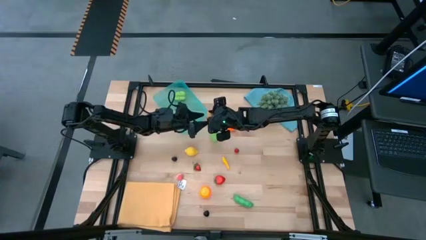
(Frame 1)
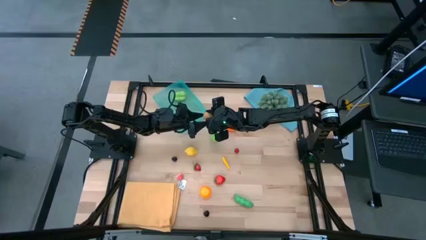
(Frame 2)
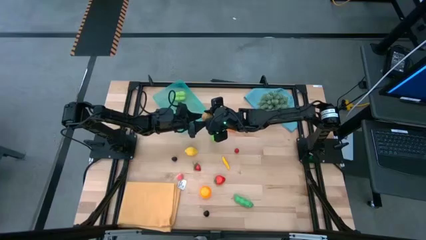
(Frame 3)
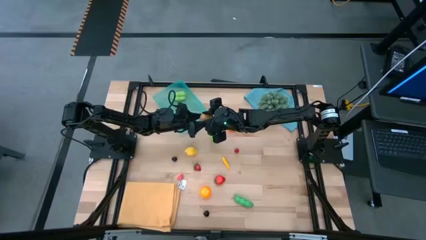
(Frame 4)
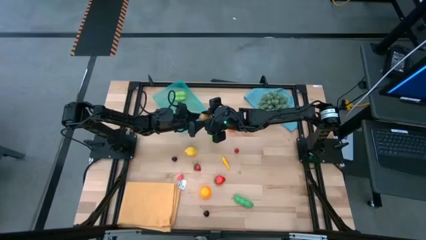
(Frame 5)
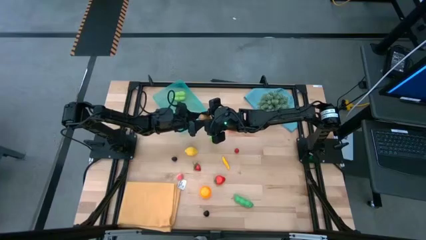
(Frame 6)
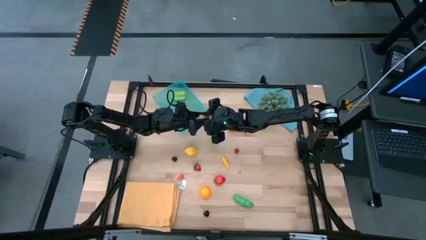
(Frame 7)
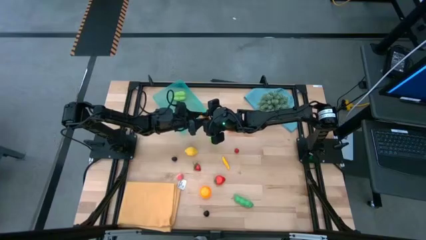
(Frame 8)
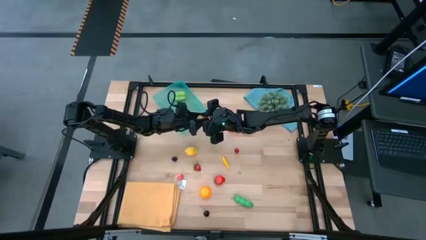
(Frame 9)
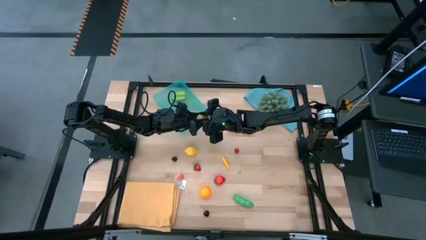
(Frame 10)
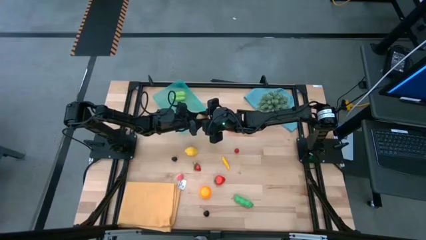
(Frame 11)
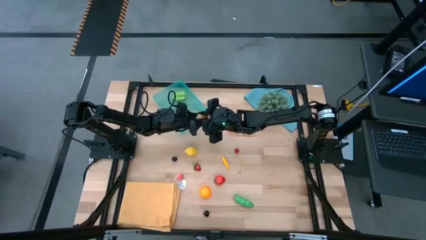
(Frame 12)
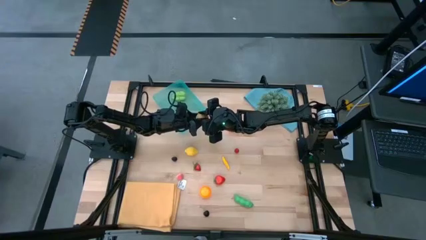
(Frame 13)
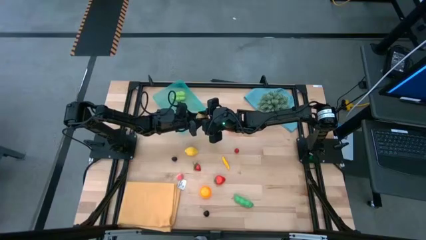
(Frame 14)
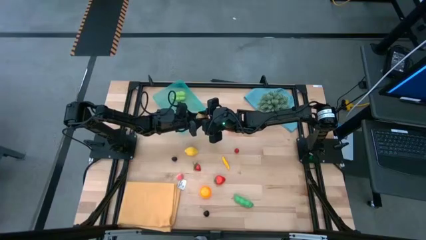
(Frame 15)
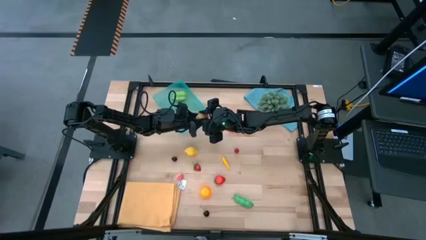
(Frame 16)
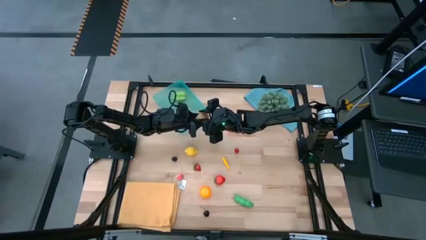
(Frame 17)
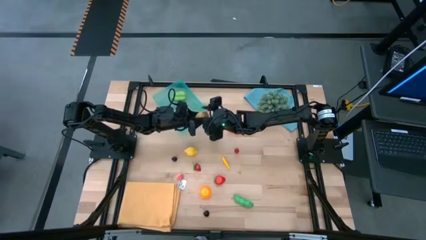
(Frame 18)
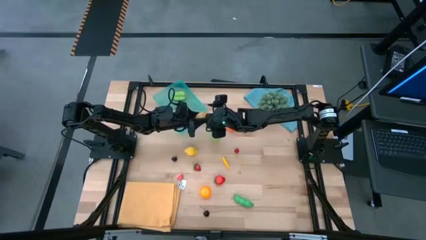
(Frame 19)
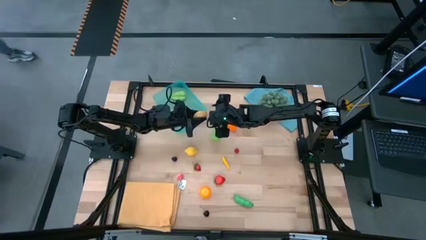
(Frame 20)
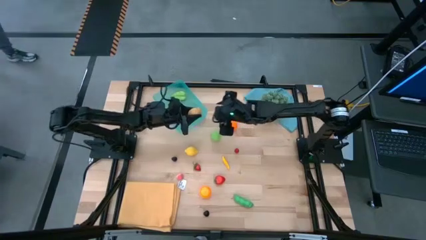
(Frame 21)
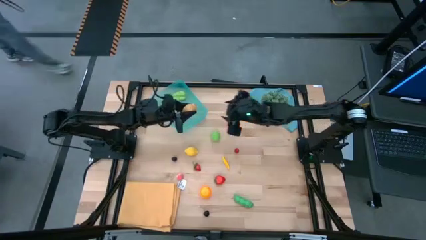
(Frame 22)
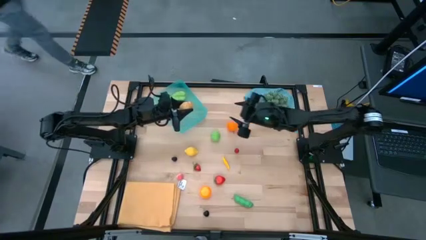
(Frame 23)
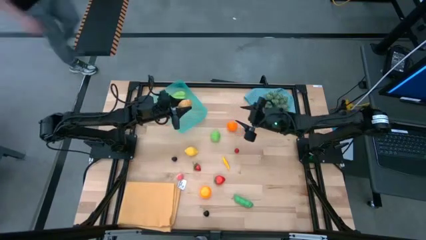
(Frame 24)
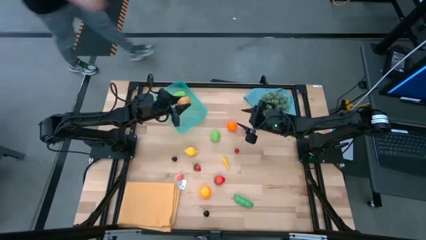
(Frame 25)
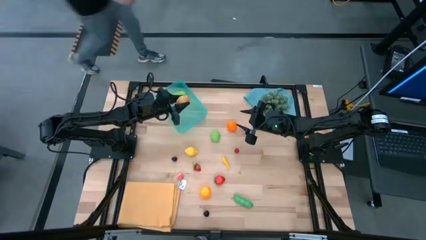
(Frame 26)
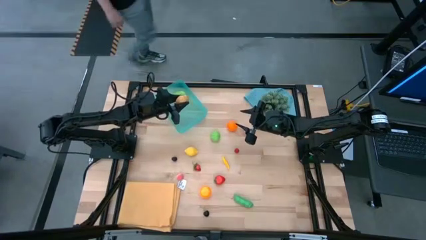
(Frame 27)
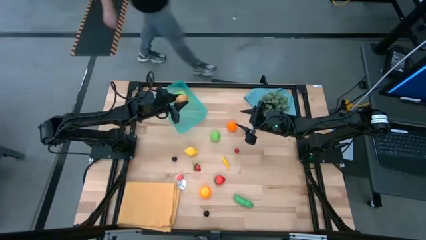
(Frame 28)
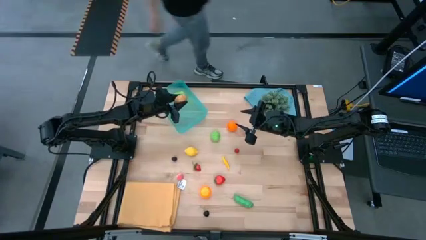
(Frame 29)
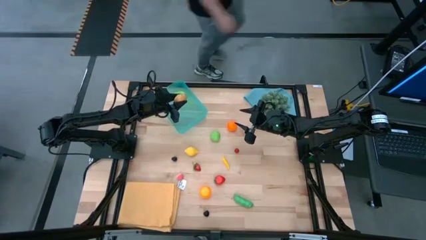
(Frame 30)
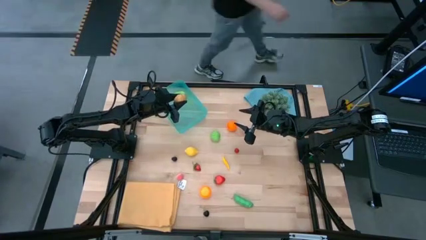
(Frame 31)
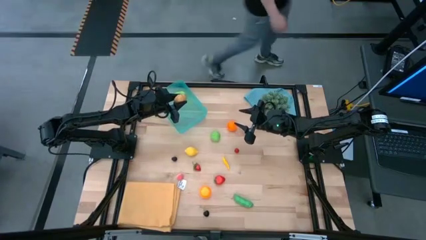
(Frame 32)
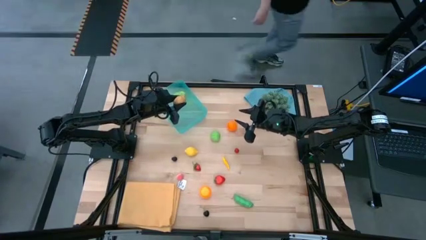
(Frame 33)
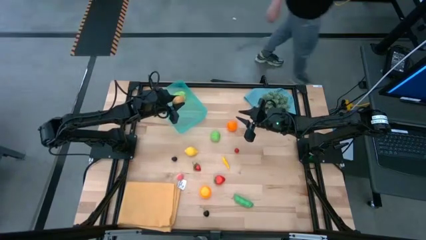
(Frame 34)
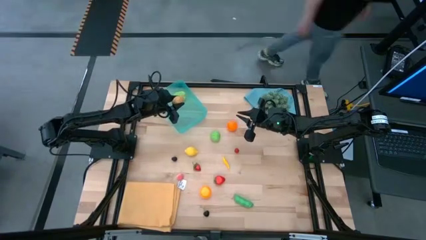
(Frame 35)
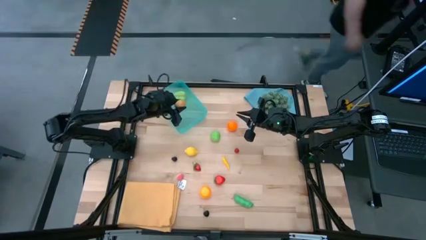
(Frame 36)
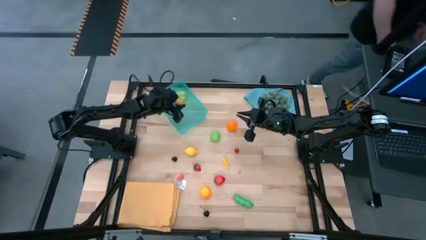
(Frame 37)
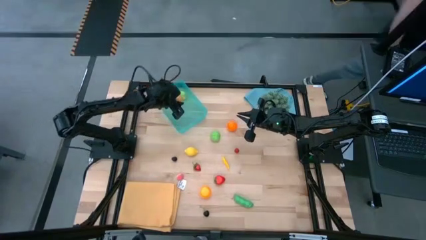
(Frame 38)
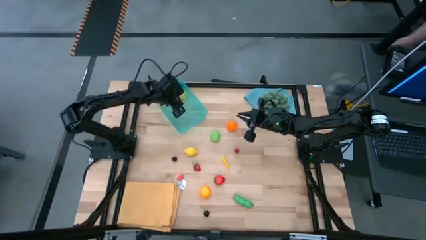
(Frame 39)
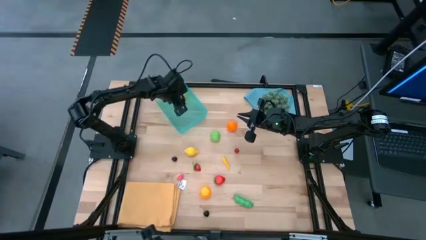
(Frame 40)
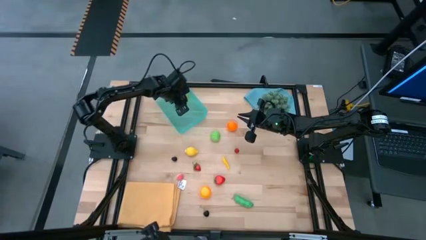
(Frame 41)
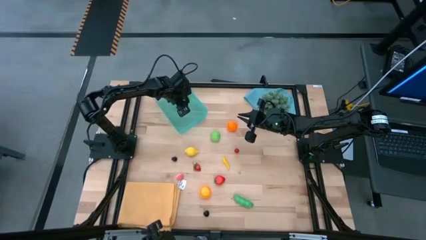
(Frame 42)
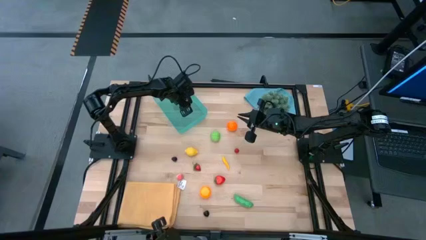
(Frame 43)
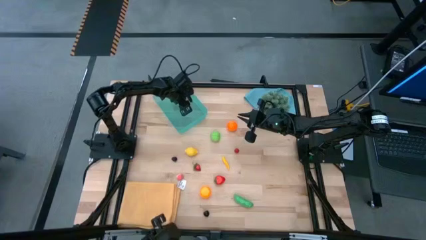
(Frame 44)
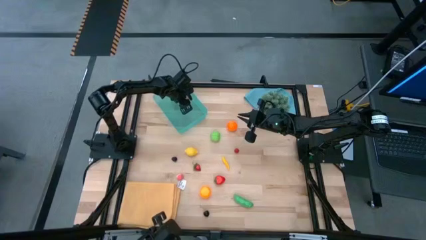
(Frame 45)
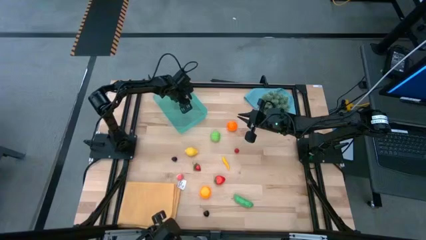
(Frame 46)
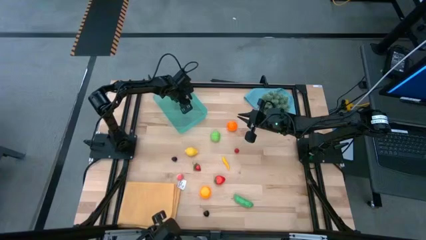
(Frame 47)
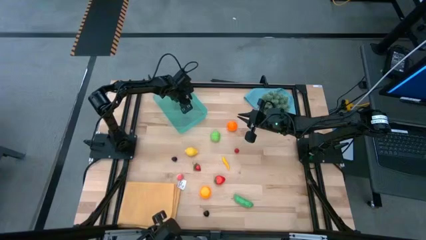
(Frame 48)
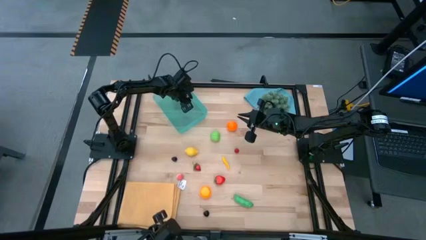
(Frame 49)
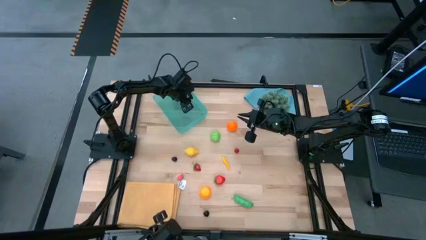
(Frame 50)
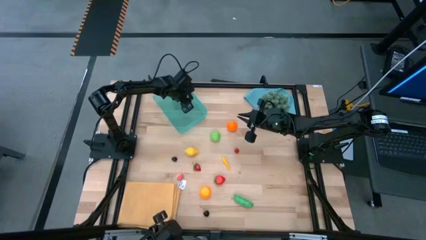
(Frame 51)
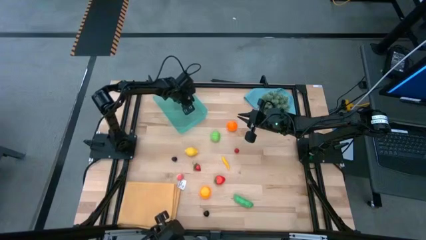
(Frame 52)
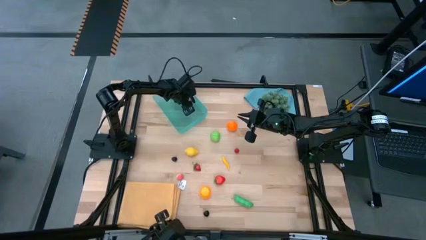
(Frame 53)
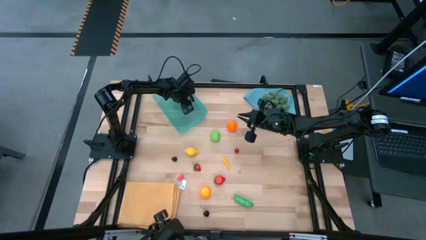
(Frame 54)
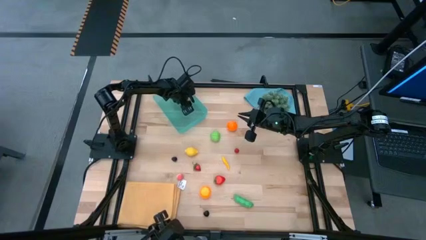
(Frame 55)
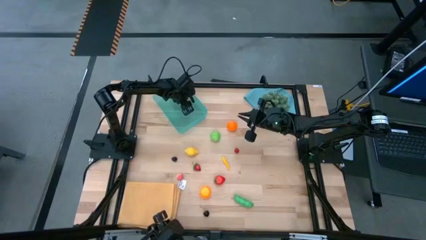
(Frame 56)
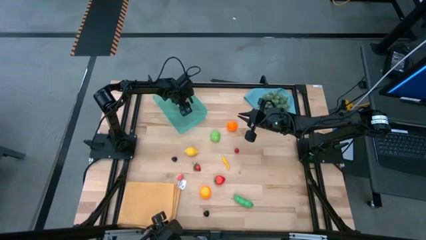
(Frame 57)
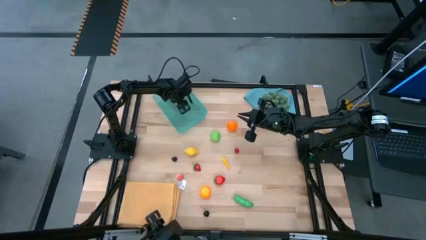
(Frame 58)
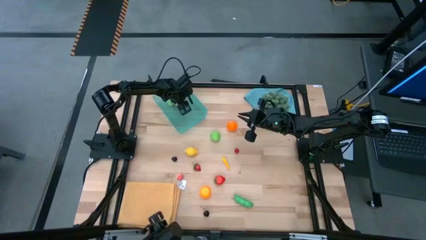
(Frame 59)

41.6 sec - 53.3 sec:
Task: Pick and placing Produce into tupperware
Put the brown potato into the blue bin

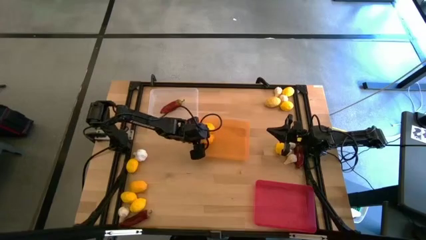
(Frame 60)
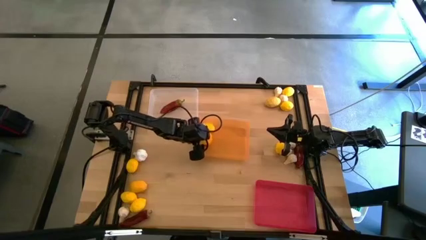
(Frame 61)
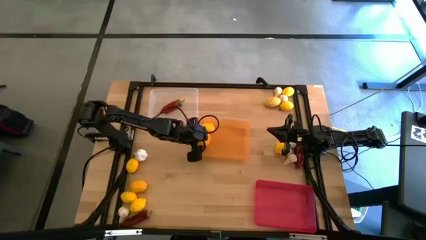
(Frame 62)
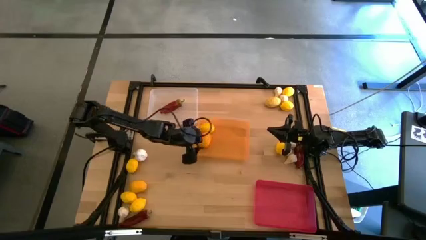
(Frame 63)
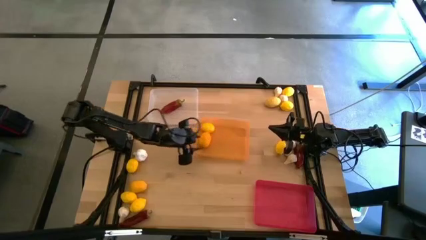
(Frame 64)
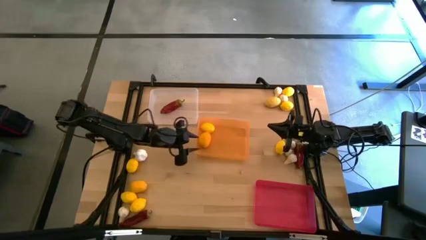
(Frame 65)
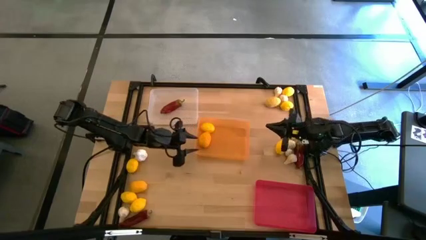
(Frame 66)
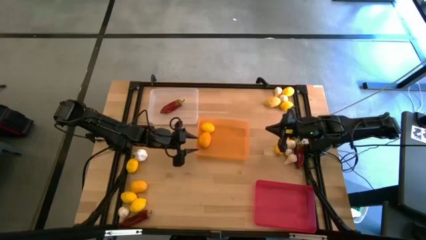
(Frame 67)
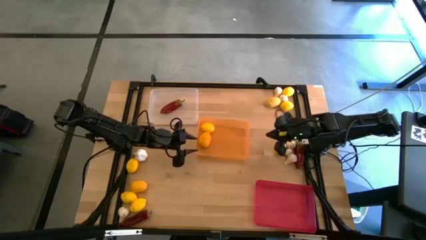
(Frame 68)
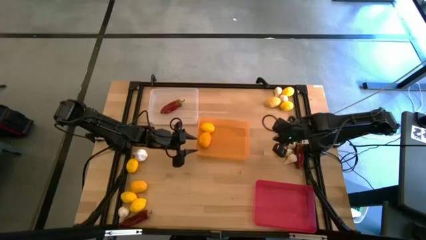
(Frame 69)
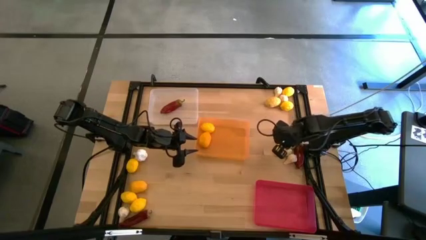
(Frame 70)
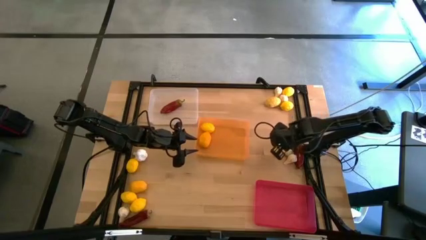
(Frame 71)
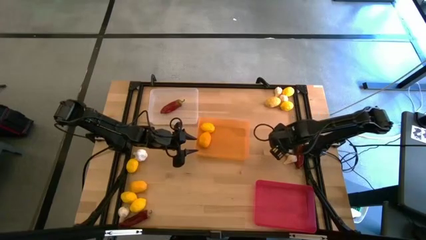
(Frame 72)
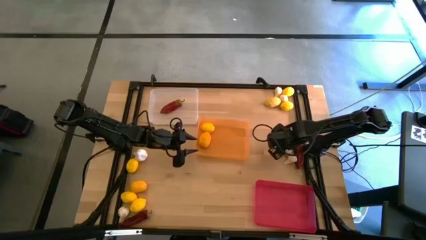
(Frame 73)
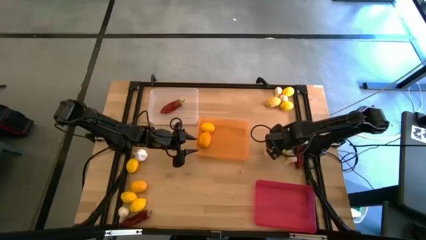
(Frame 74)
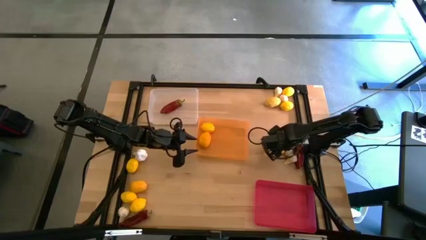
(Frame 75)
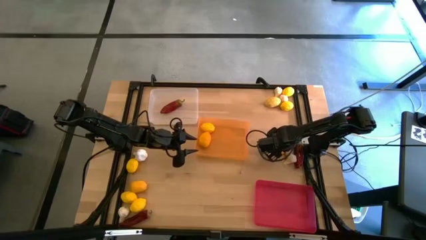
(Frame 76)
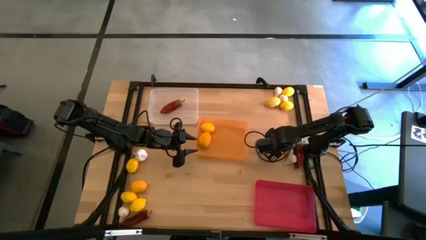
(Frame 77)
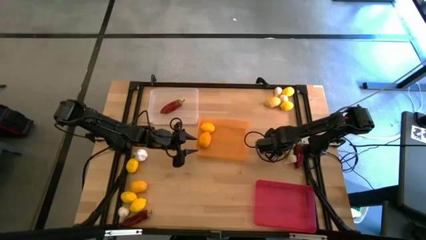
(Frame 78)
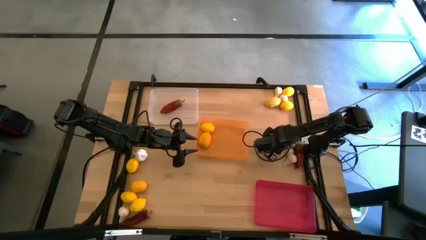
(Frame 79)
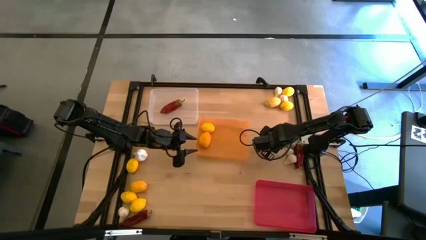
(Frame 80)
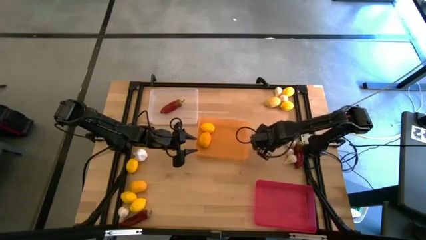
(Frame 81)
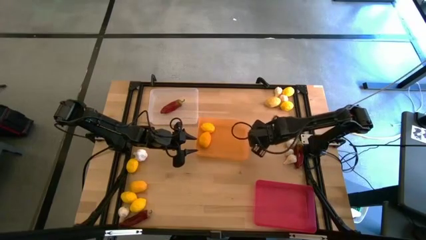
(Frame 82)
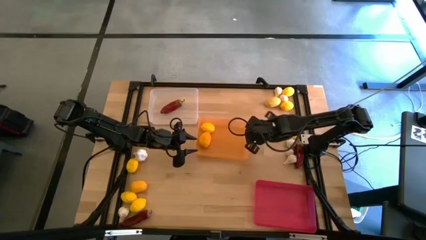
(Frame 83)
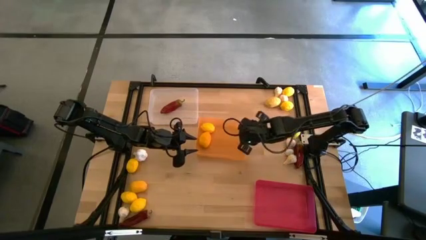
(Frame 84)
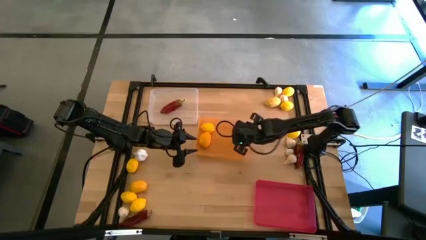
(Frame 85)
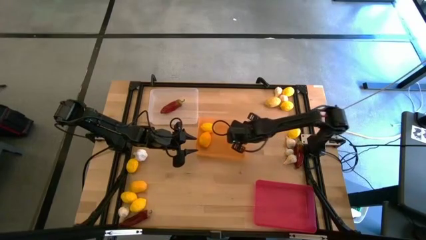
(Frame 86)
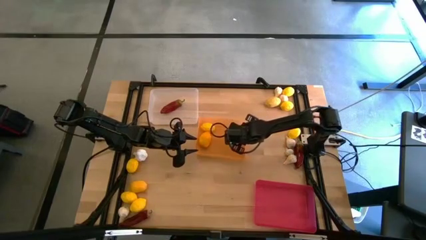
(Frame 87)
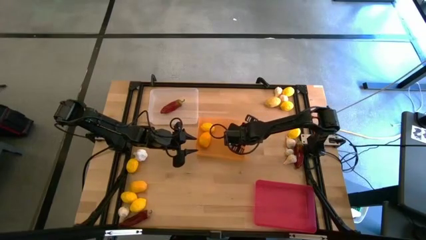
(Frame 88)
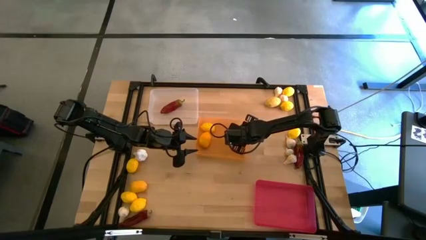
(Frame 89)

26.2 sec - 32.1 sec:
Task: Sort produce into baskets
Put the lemon into the orange bin
